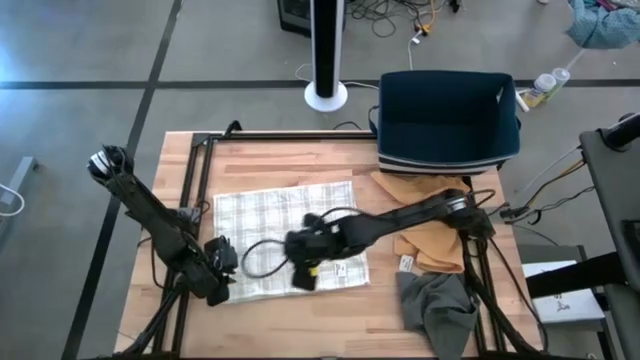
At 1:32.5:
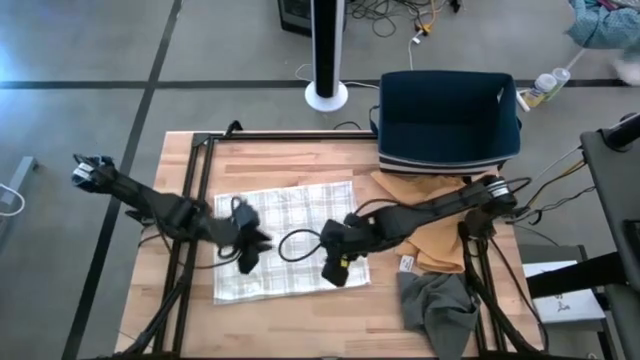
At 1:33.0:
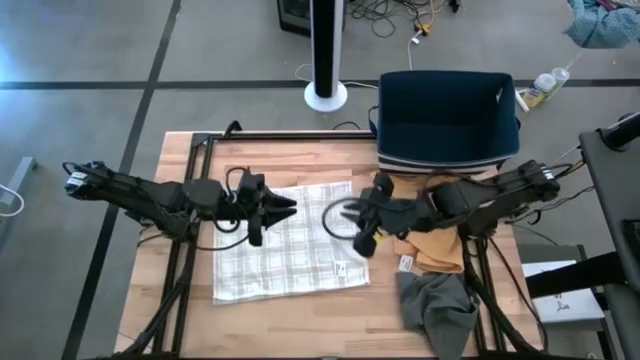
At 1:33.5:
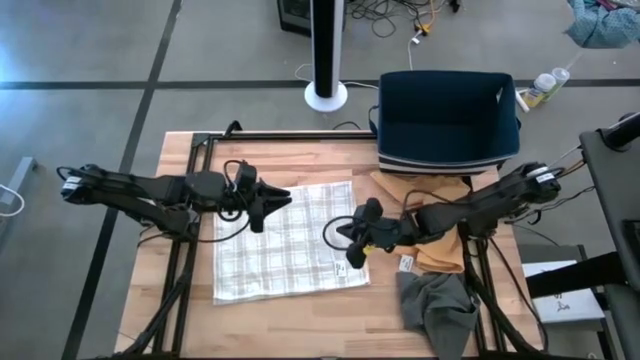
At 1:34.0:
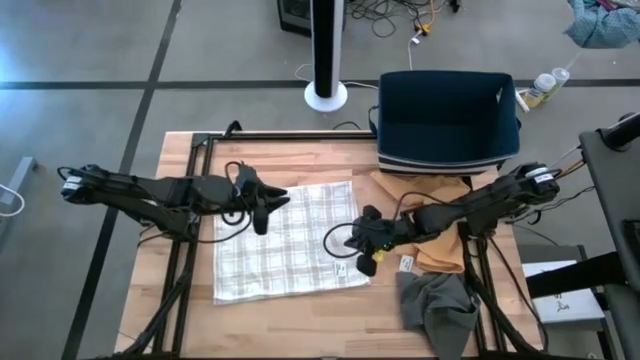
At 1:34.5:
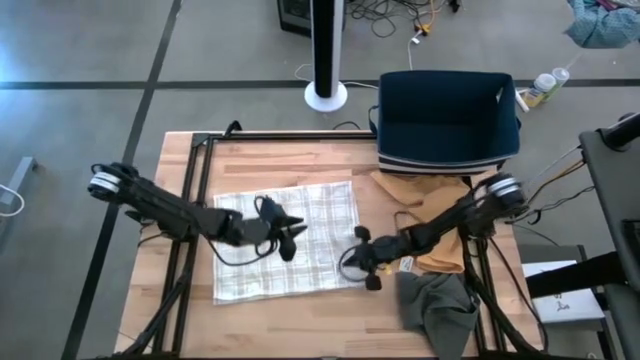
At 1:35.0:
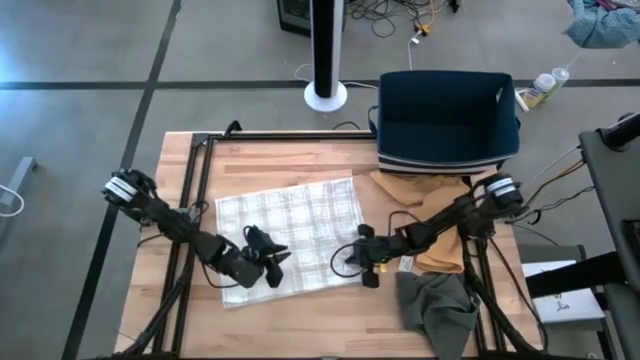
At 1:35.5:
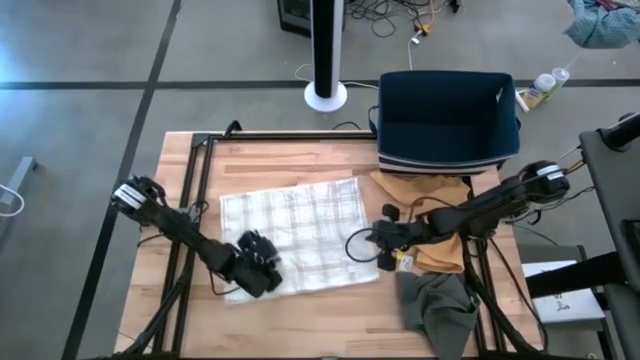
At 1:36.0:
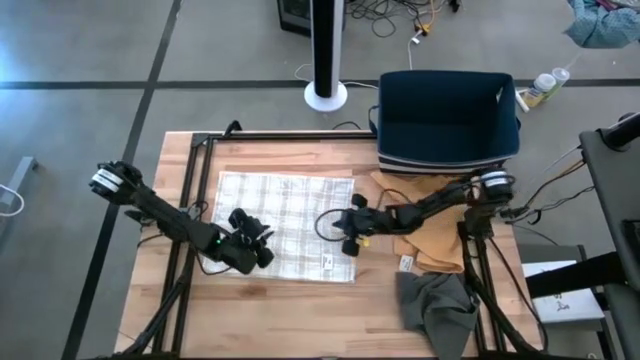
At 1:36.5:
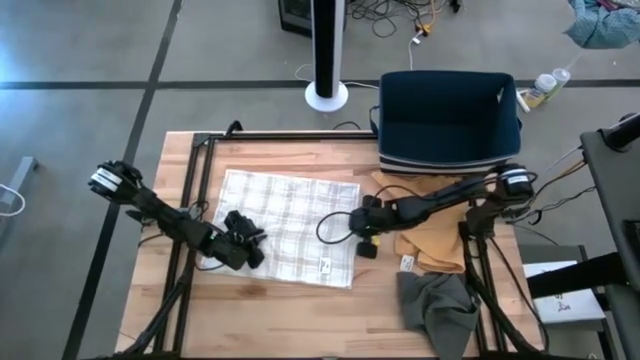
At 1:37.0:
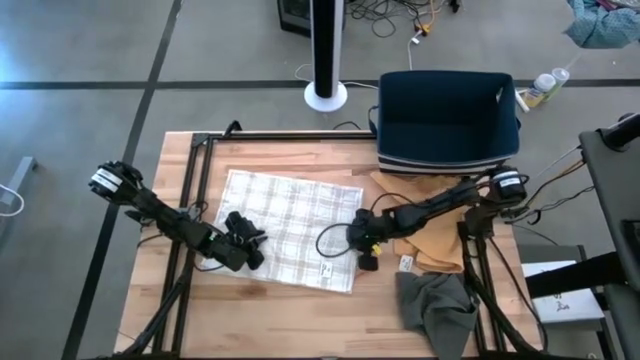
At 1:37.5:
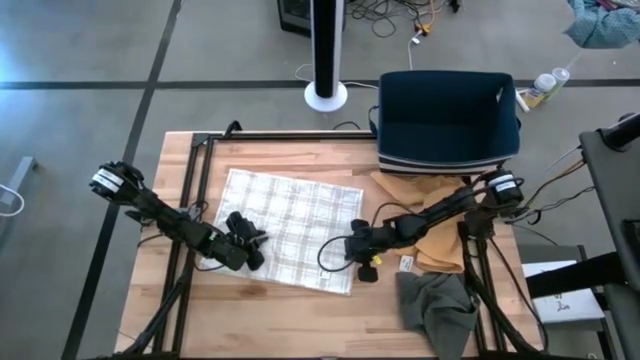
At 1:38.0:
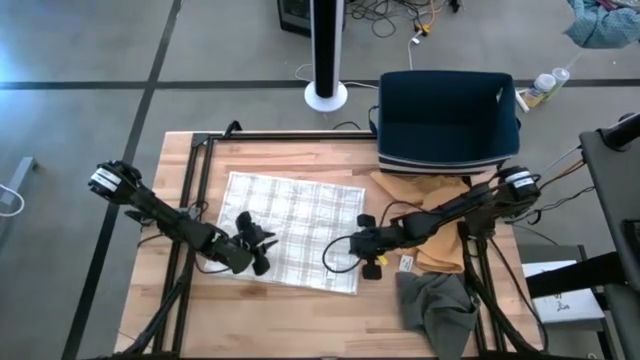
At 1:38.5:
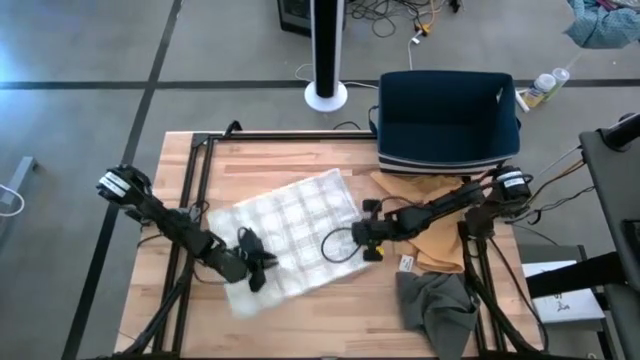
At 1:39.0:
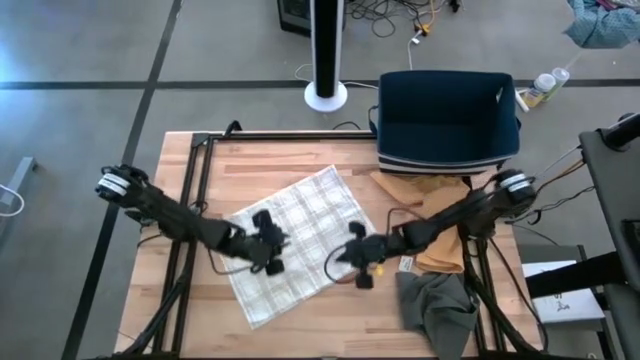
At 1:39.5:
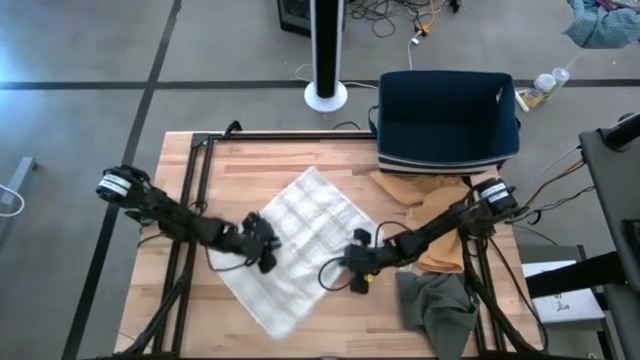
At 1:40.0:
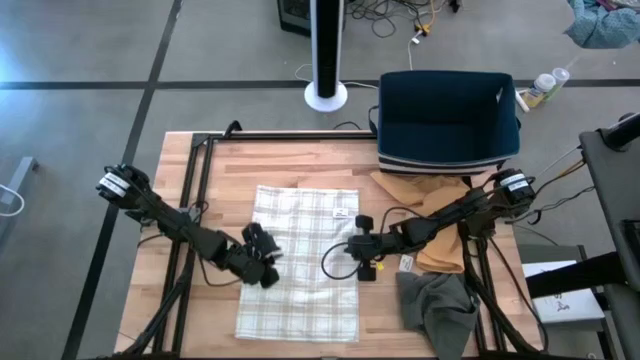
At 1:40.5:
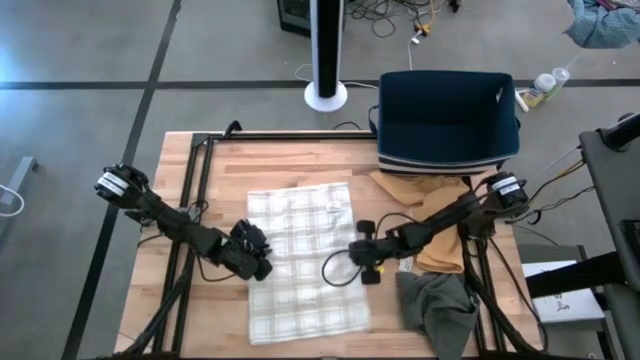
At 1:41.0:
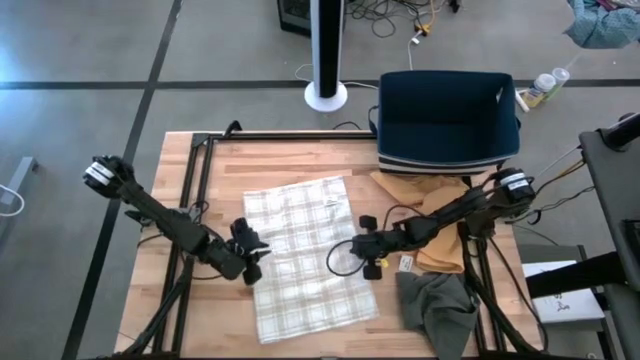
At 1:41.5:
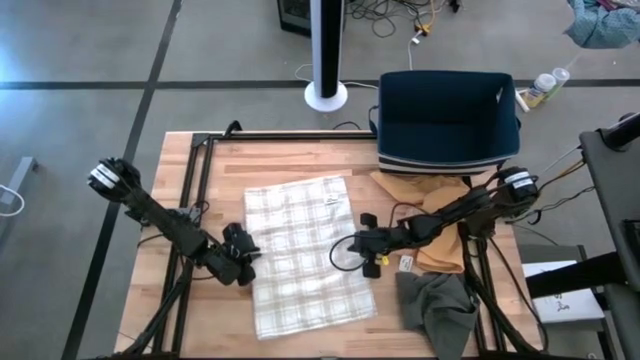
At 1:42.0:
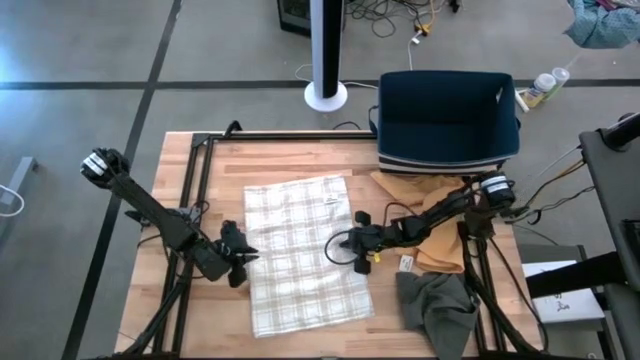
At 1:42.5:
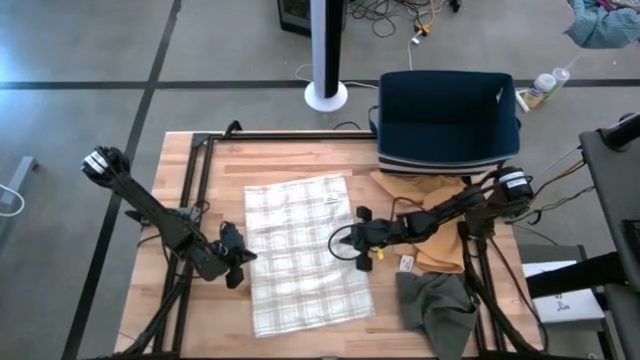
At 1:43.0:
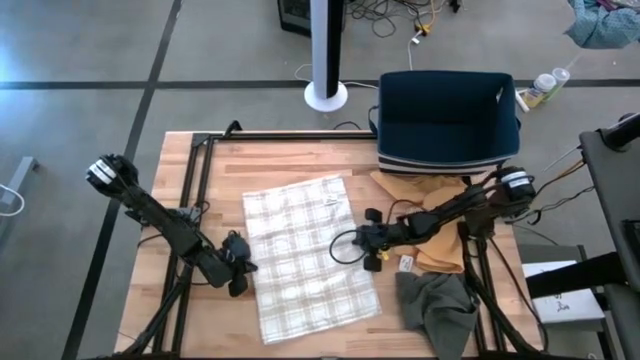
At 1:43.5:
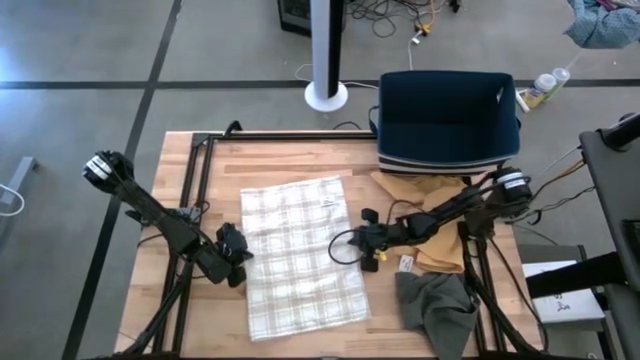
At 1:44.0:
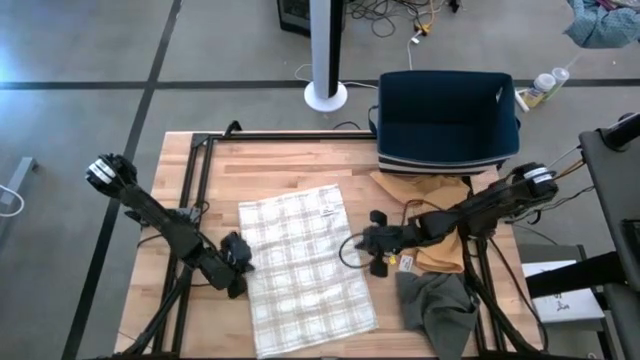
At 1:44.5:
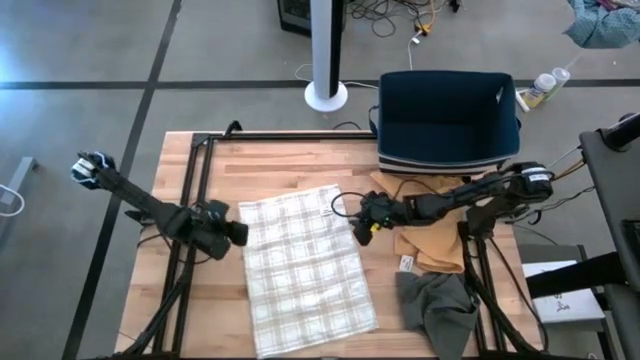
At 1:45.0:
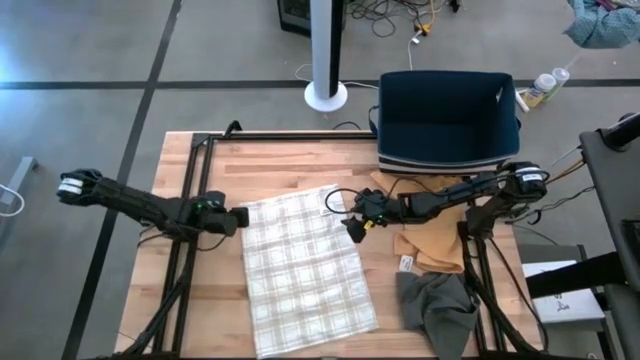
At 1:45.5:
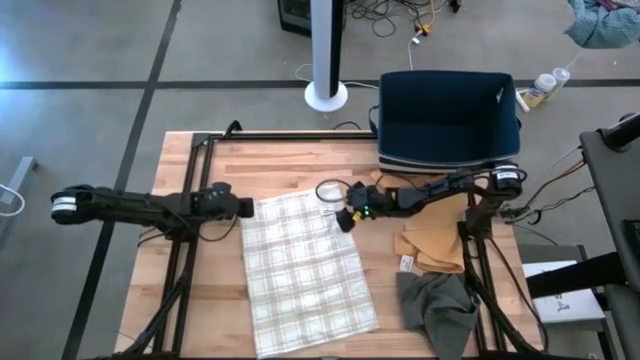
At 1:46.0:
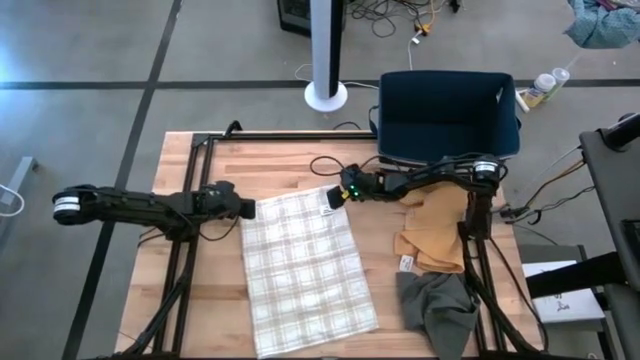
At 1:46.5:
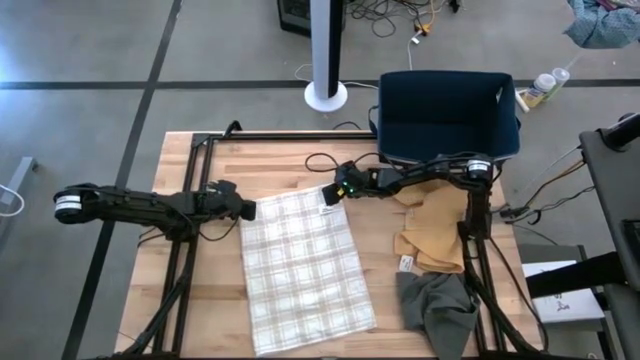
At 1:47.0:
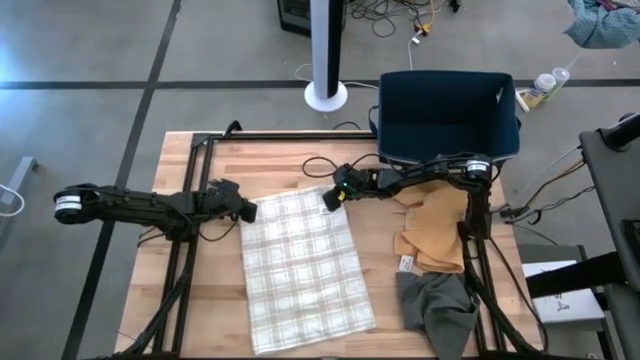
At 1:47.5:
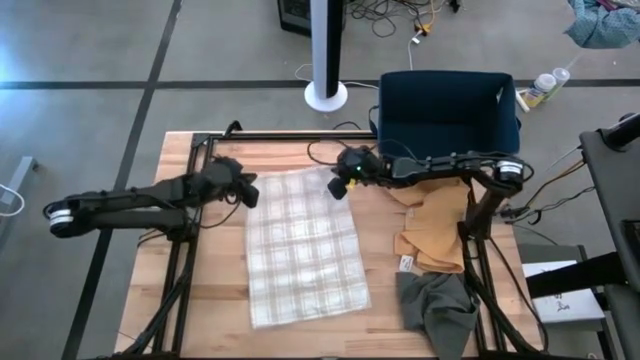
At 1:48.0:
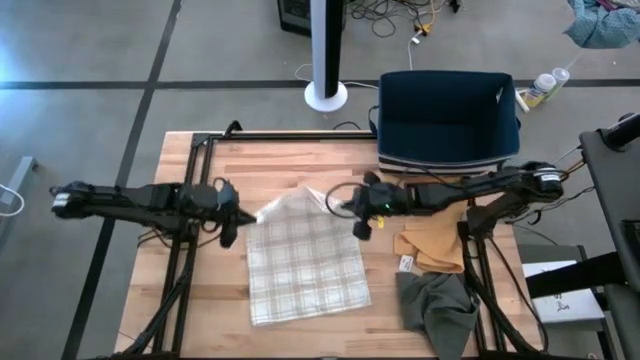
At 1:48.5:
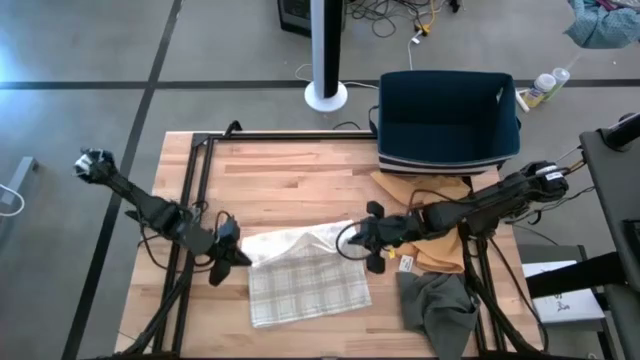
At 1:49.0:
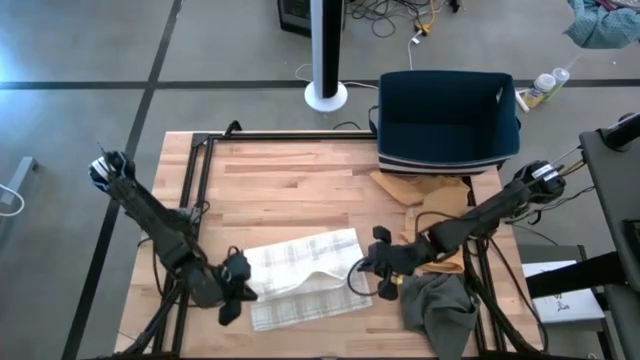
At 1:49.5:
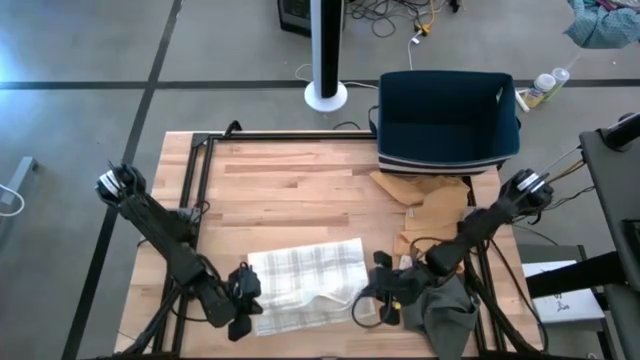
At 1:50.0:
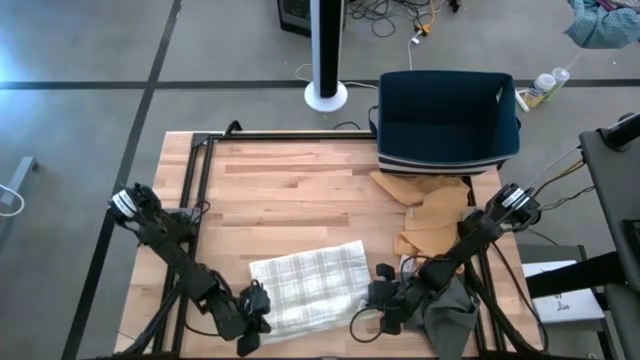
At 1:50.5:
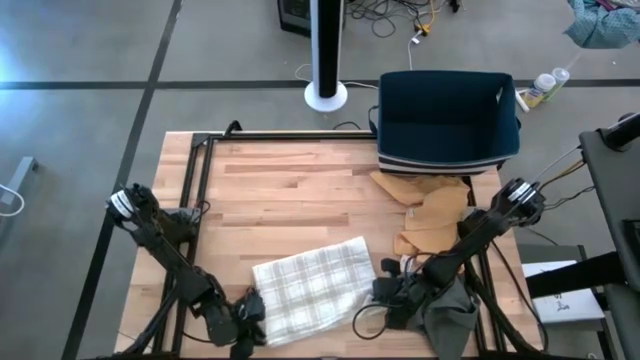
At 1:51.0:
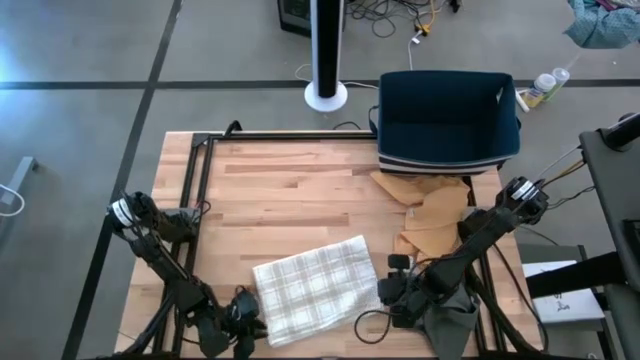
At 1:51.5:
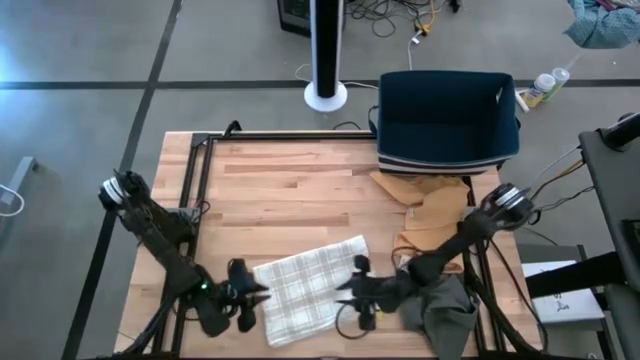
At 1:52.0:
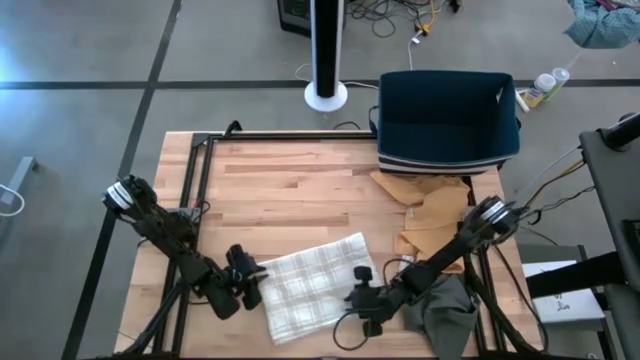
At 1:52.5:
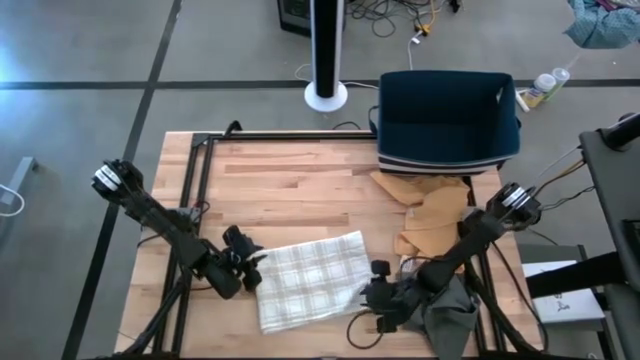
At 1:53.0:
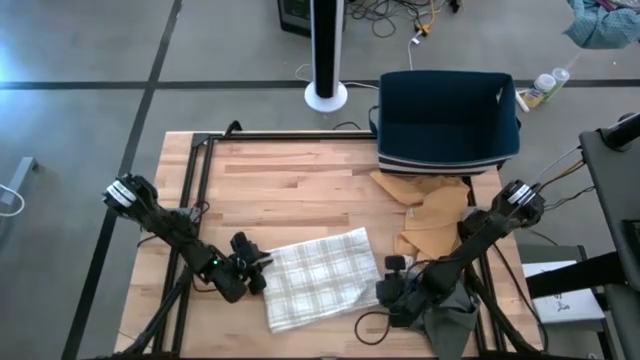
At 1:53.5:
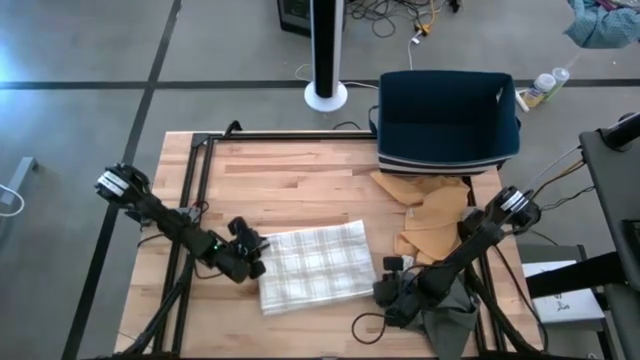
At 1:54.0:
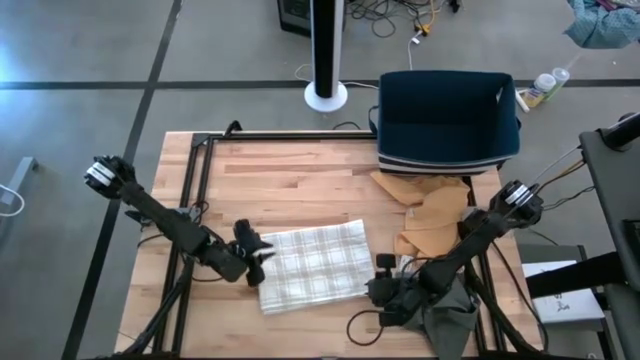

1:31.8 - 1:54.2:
Task: Fold towel
Fold the white towel
